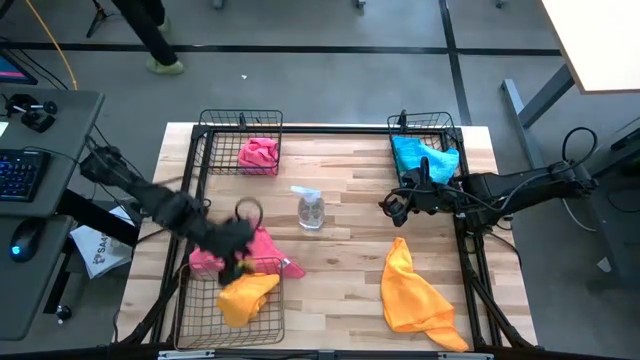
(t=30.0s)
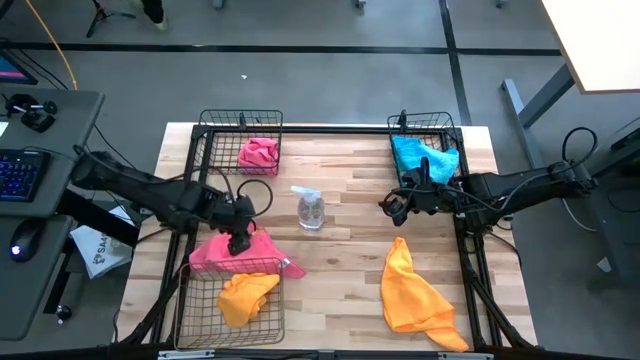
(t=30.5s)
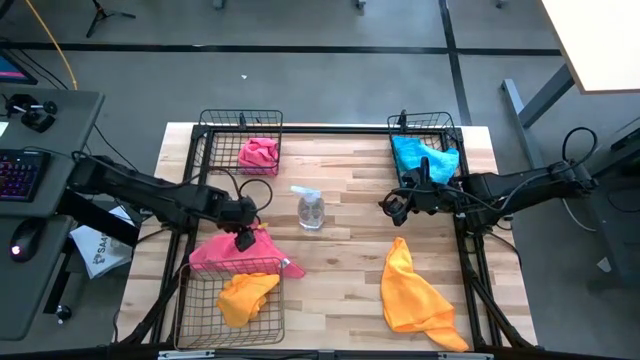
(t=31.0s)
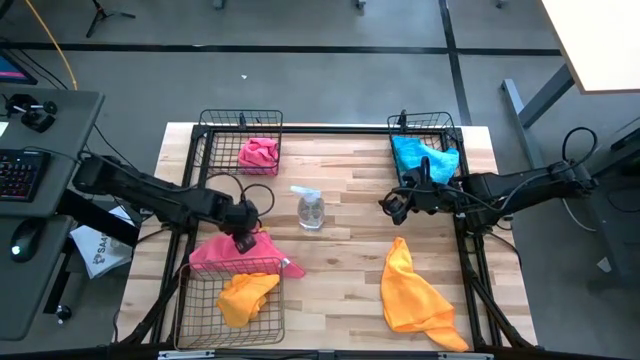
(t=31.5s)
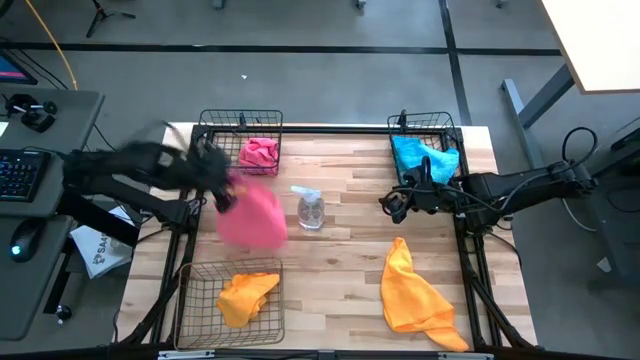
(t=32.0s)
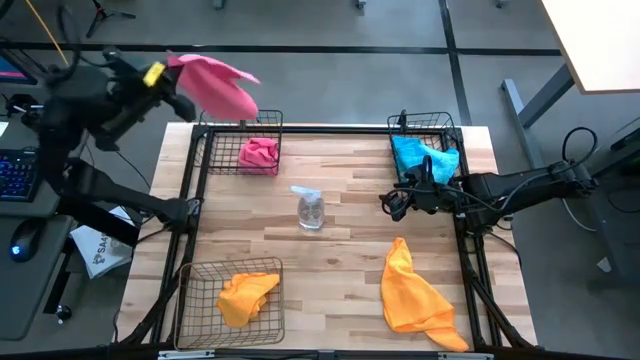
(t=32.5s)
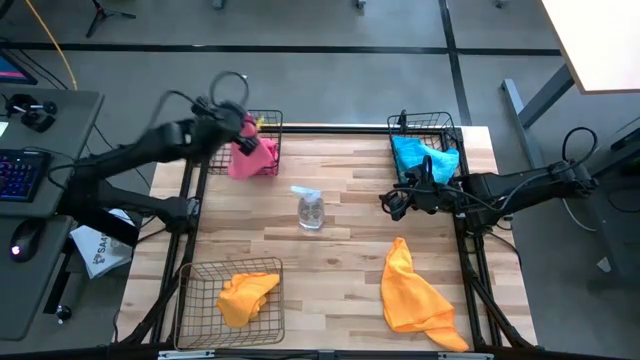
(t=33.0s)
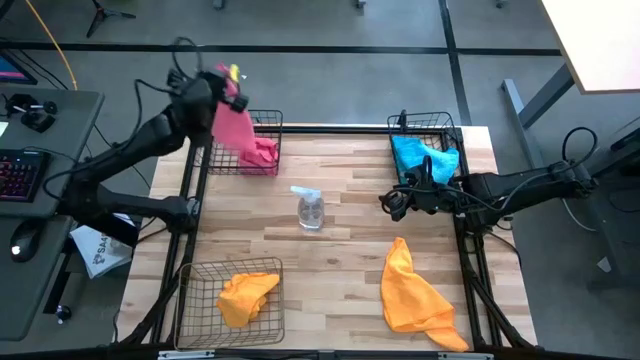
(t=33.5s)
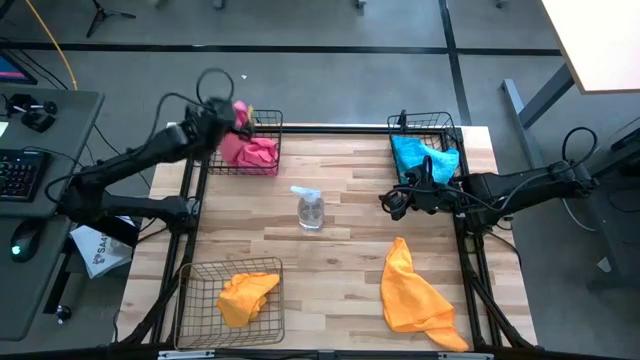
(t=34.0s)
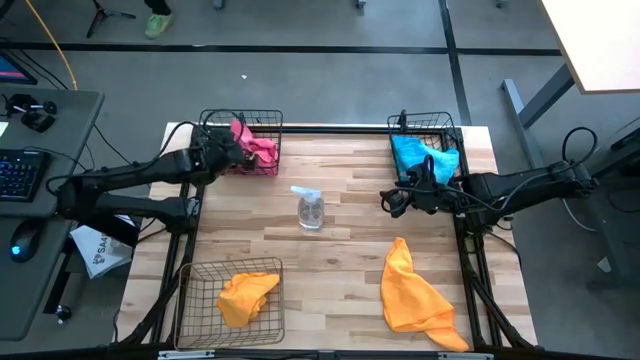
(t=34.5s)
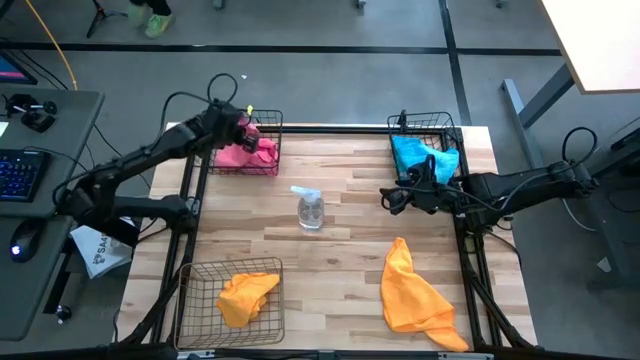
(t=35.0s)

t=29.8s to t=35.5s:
Task: Sort microfiber towel by color & place in baskets
Put the pink microfiber towel into the left black wire basket

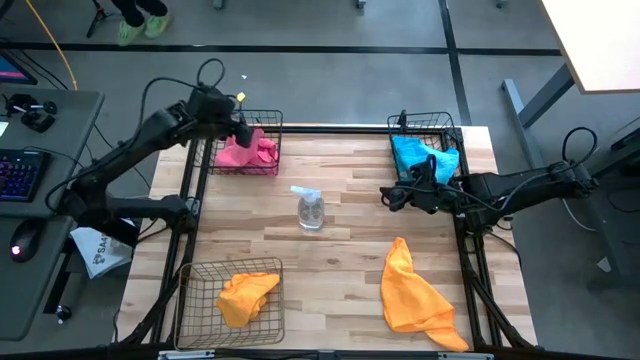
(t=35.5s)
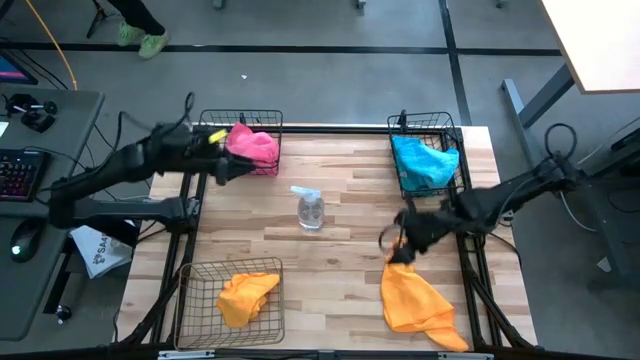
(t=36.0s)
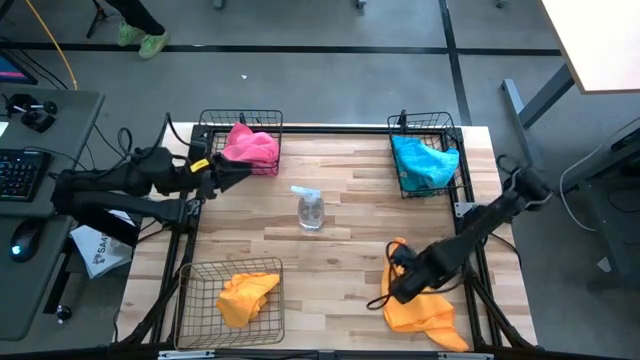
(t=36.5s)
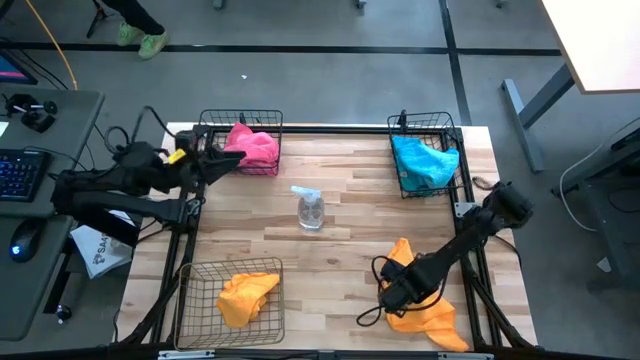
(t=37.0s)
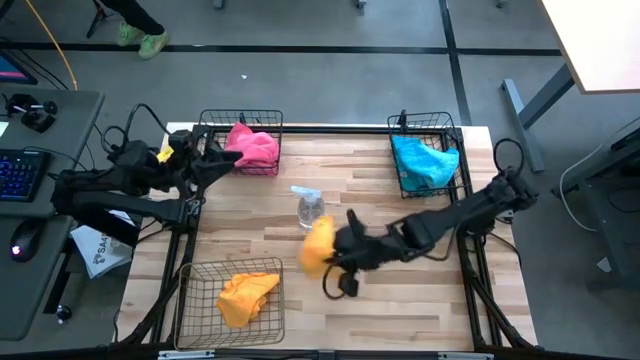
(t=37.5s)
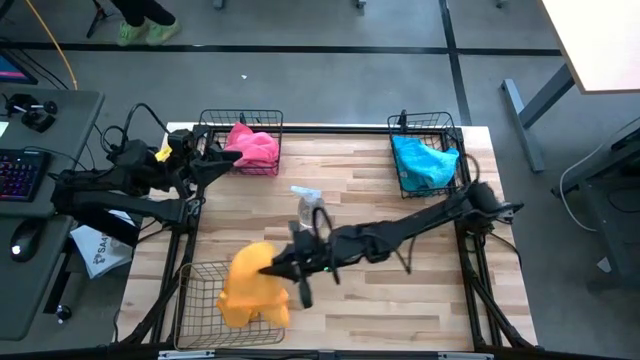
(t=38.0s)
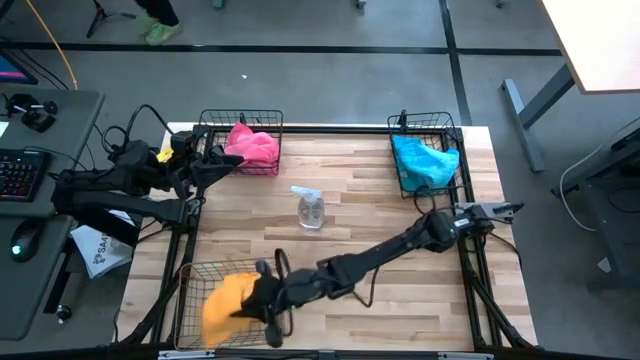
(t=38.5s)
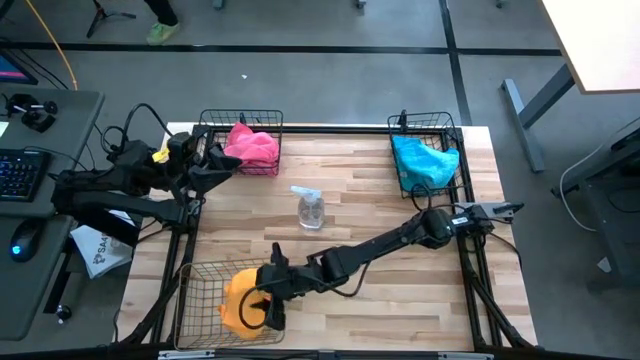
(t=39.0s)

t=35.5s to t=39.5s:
Put the yellow microfiber towel into the gold wire basket

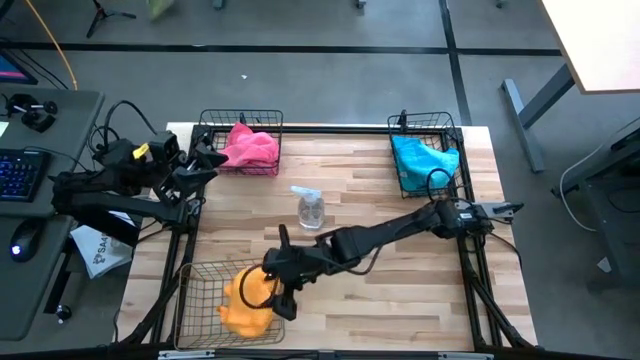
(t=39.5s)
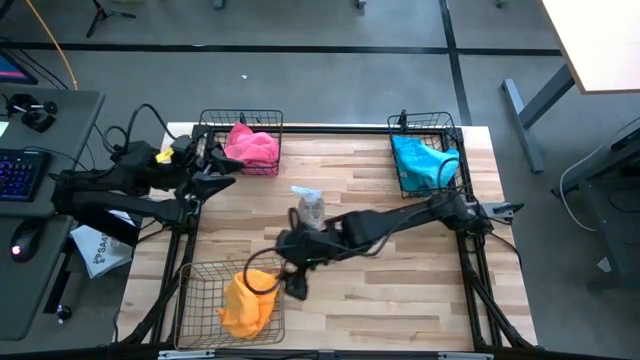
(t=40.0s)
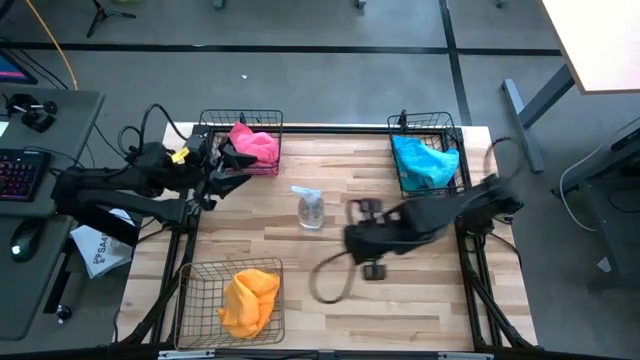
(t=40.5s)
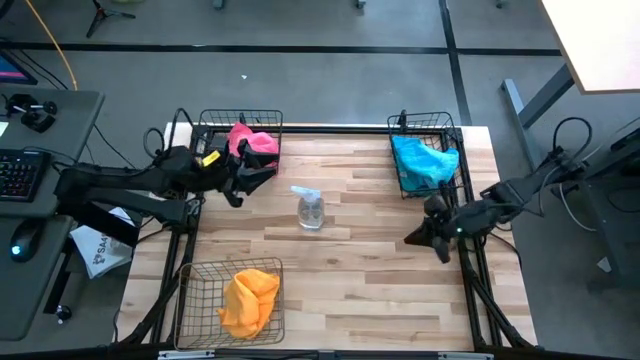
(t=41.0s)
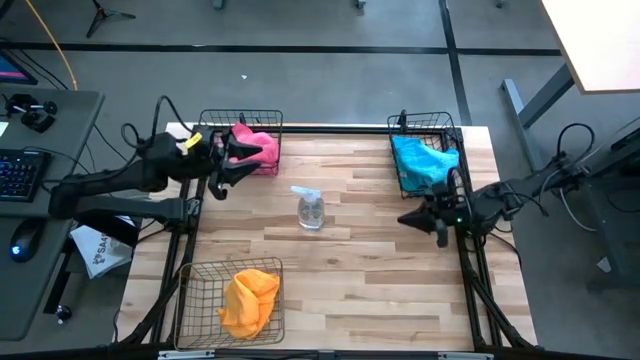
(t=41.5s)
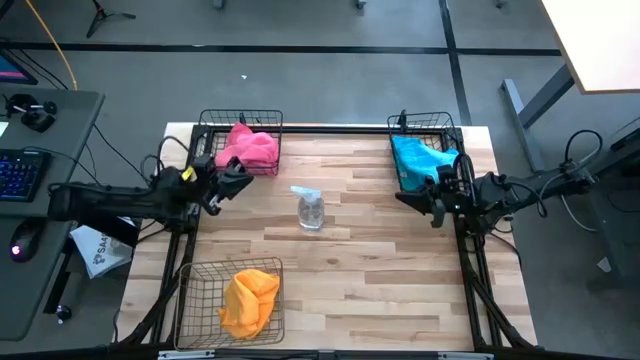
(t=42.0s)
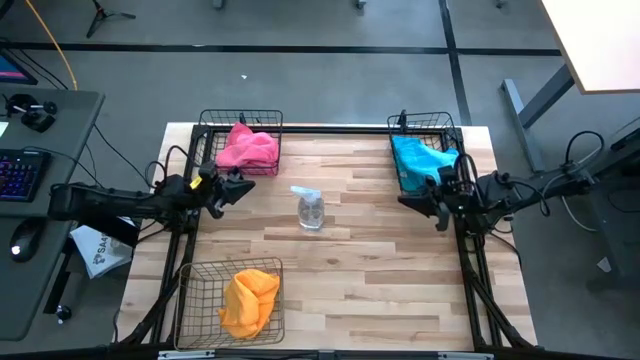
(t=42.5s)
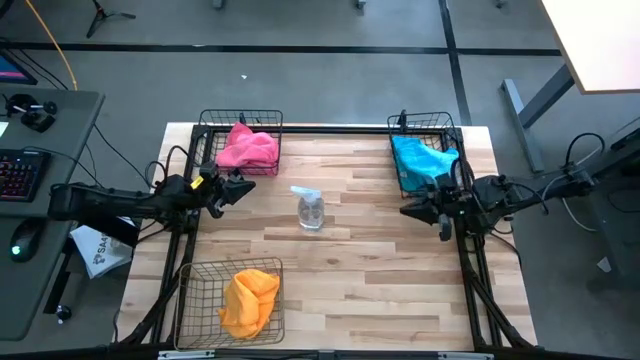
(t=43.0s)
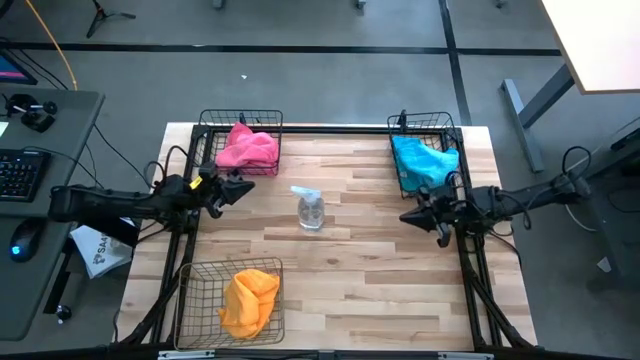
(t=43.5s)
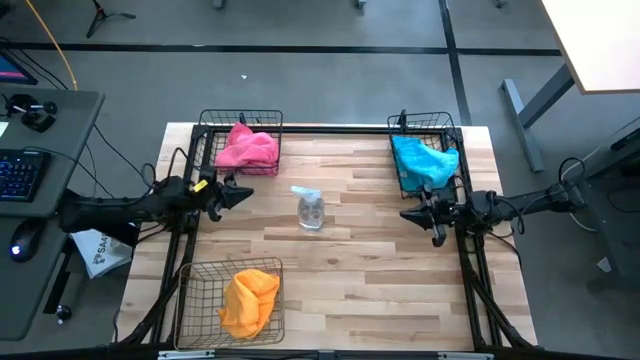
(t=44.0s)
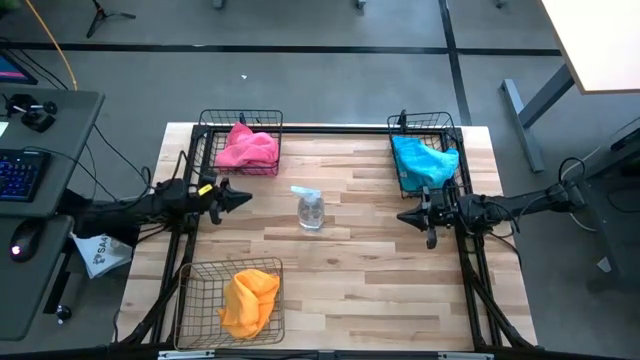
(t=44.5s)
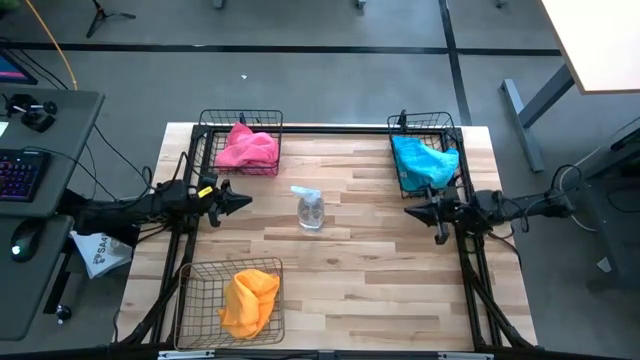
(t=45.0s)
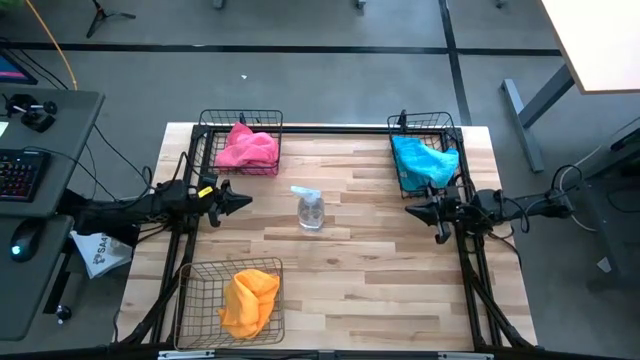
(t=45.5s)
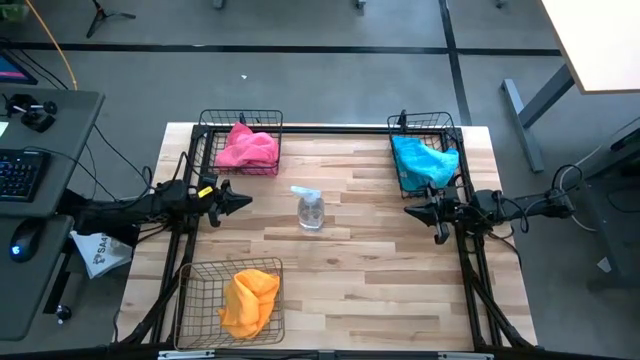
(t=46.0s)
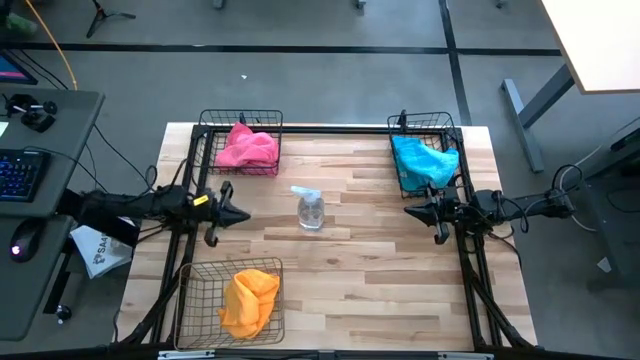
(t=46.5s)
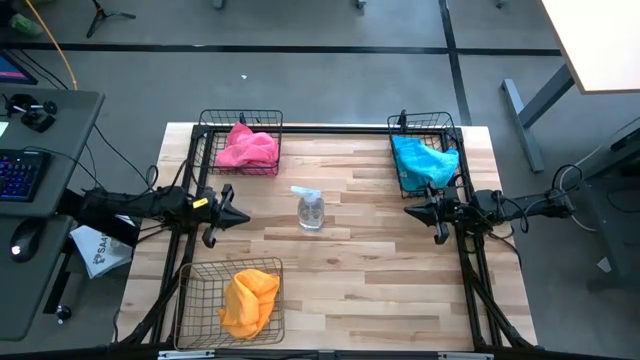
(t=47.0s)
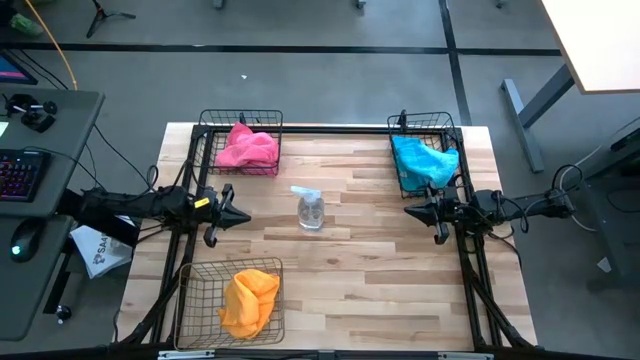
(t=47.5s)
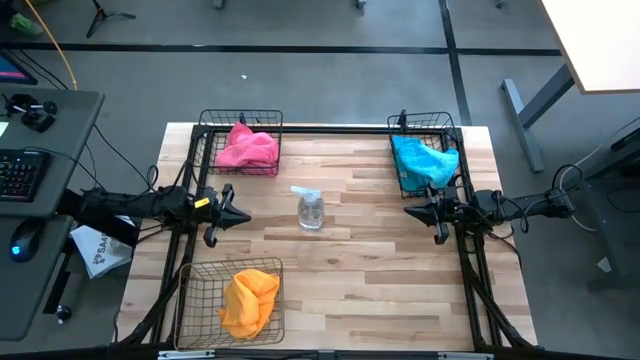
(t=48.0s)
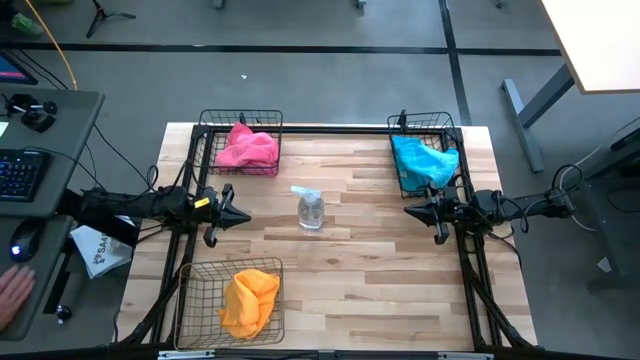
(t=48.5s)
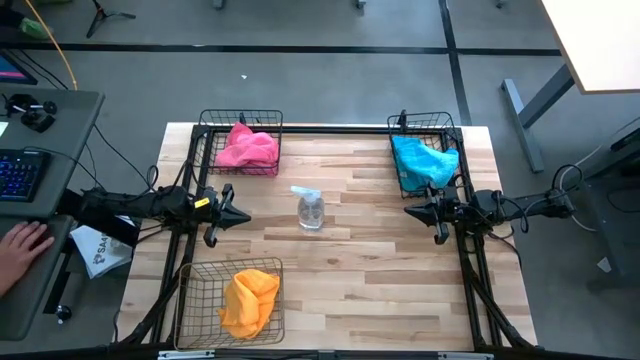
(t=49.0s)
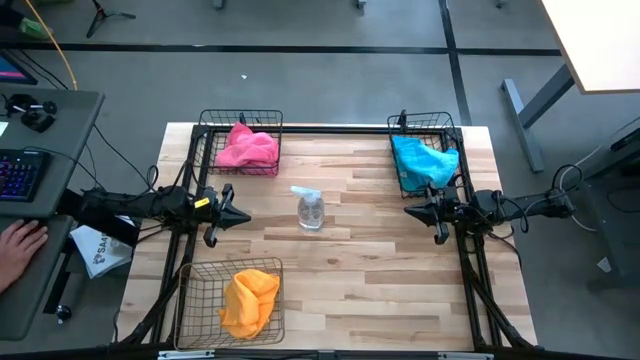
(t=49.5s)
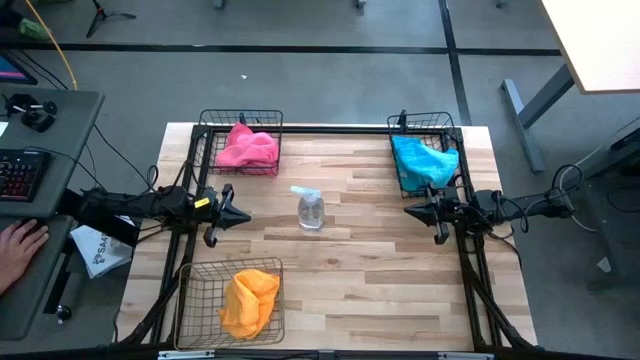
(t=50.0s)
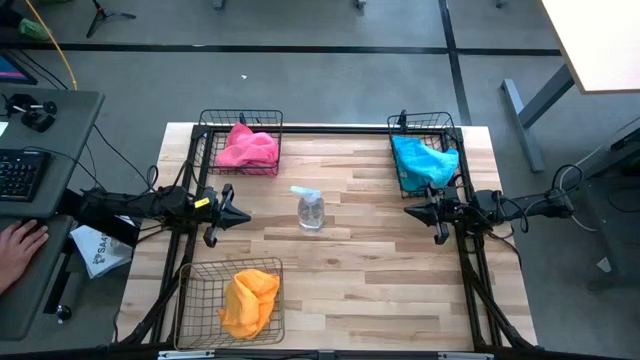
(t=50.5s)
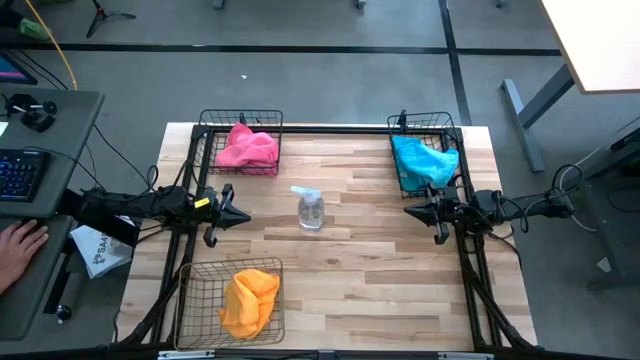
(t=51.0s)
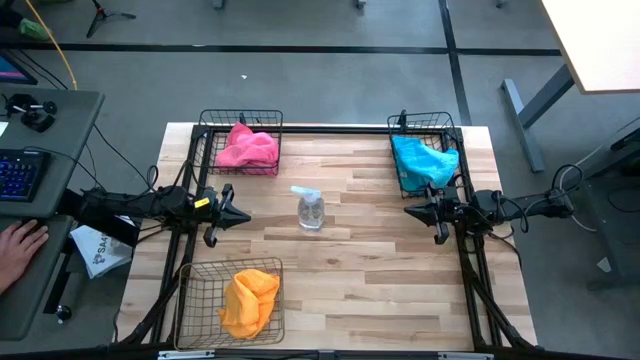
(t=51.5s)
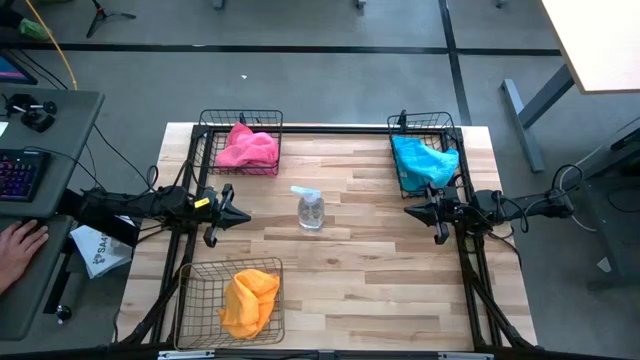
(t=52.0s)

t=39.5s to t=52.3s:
Return To Home Position
